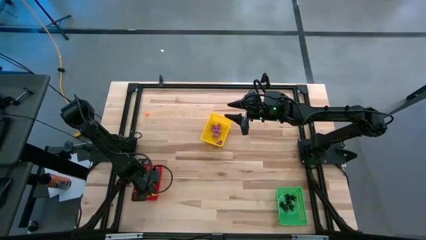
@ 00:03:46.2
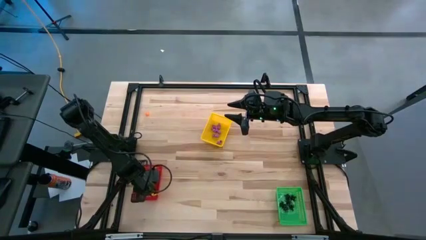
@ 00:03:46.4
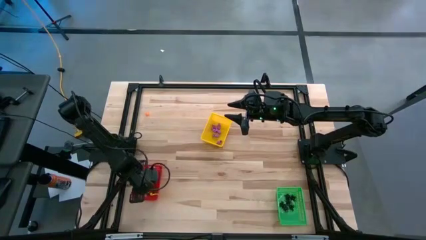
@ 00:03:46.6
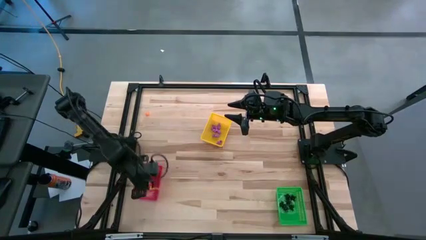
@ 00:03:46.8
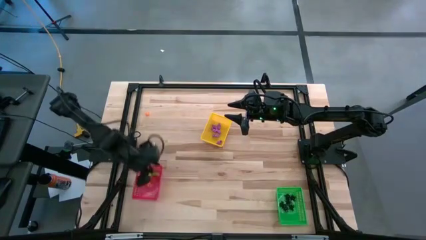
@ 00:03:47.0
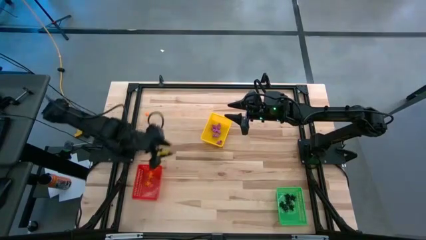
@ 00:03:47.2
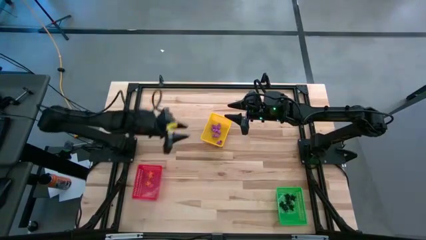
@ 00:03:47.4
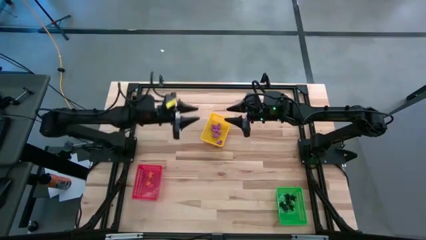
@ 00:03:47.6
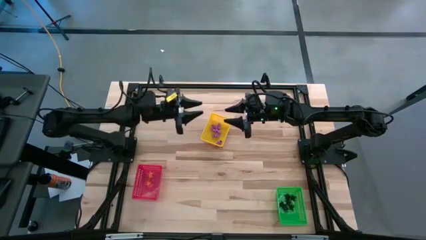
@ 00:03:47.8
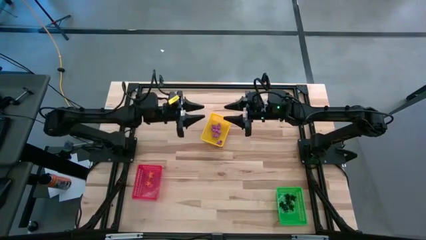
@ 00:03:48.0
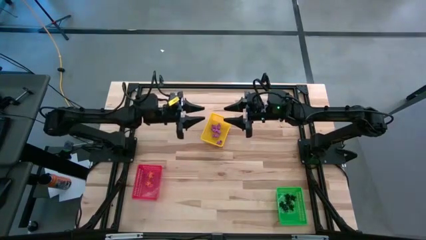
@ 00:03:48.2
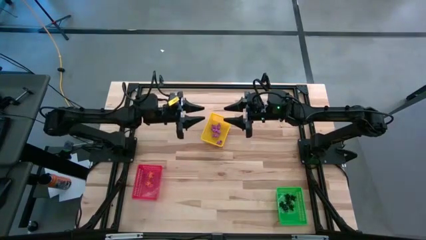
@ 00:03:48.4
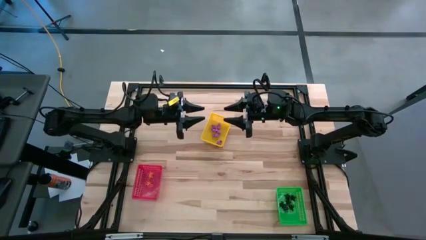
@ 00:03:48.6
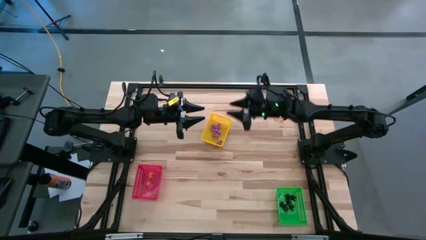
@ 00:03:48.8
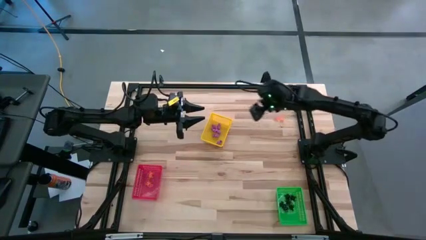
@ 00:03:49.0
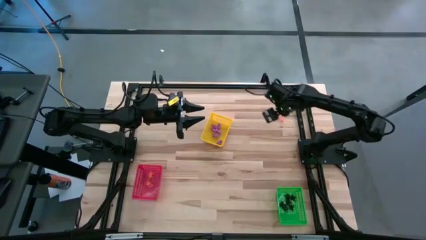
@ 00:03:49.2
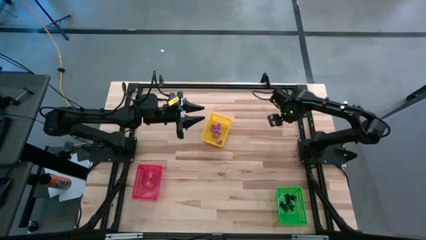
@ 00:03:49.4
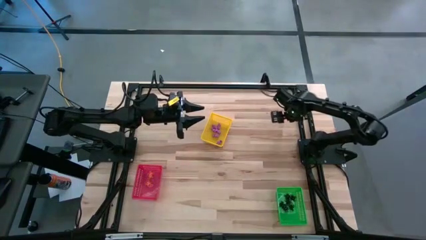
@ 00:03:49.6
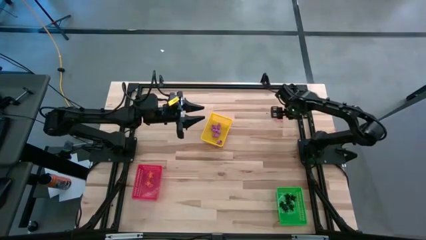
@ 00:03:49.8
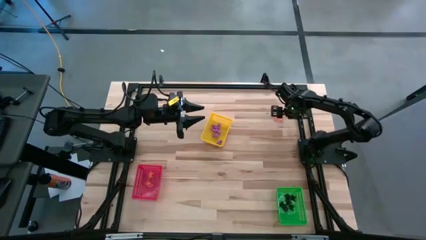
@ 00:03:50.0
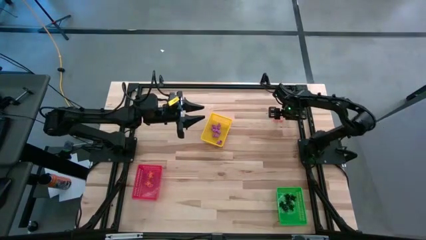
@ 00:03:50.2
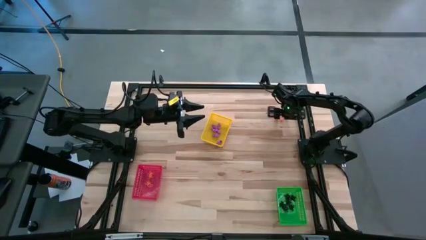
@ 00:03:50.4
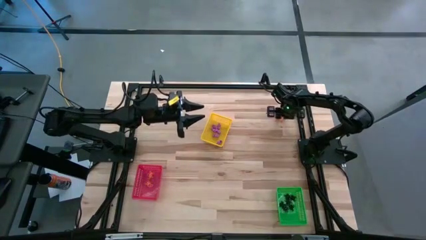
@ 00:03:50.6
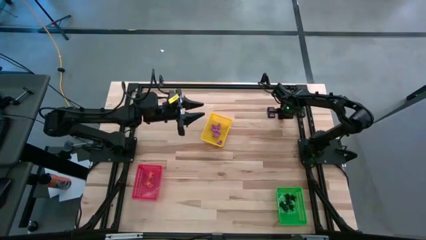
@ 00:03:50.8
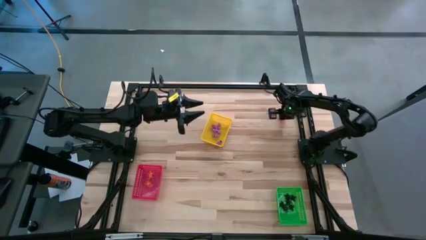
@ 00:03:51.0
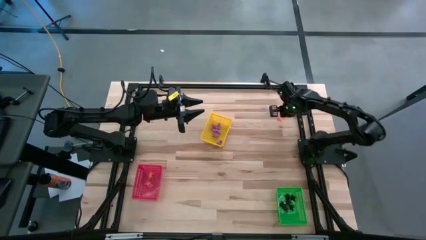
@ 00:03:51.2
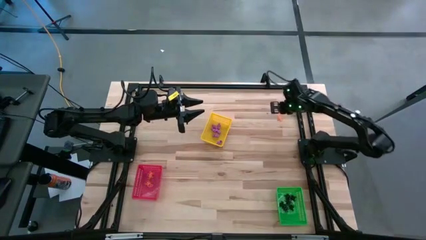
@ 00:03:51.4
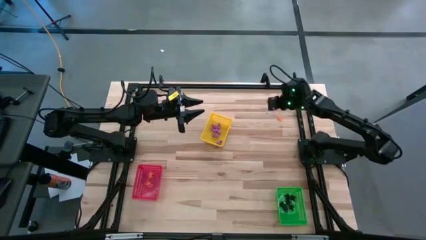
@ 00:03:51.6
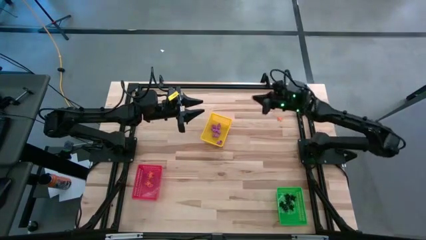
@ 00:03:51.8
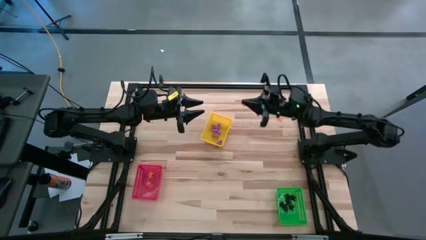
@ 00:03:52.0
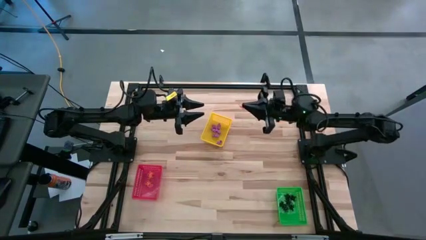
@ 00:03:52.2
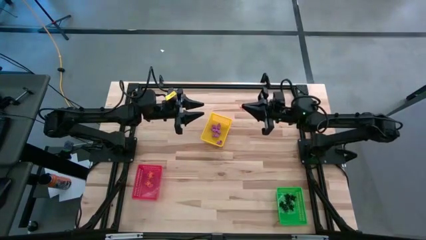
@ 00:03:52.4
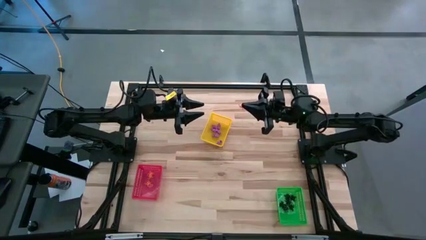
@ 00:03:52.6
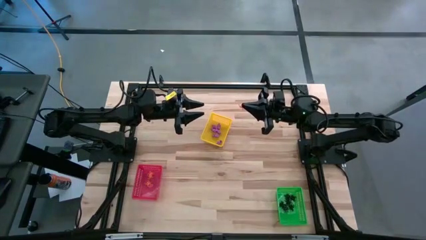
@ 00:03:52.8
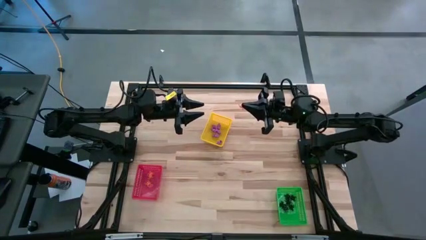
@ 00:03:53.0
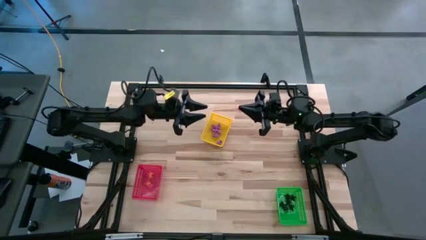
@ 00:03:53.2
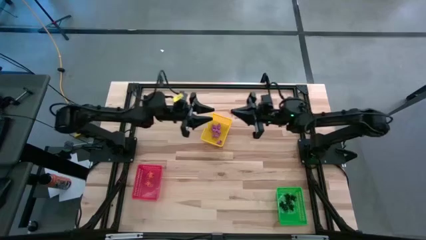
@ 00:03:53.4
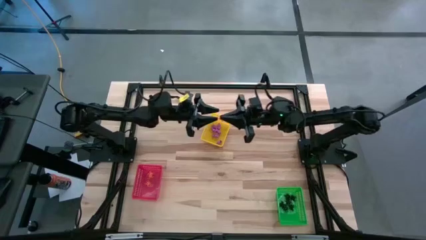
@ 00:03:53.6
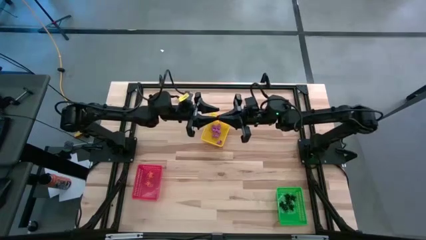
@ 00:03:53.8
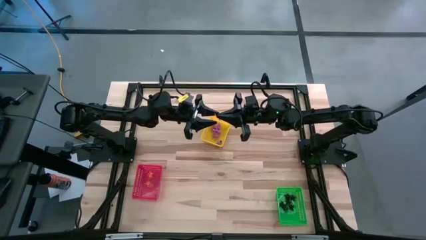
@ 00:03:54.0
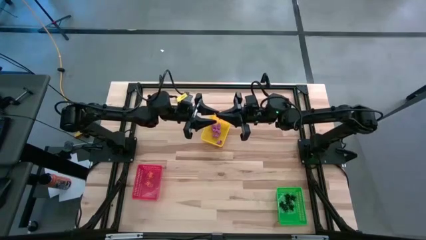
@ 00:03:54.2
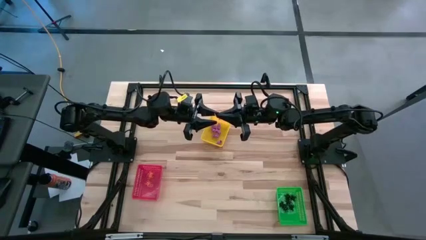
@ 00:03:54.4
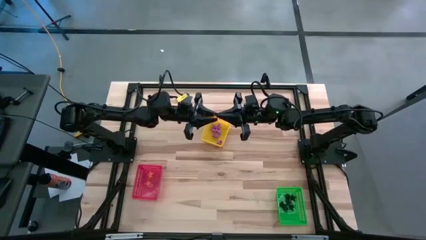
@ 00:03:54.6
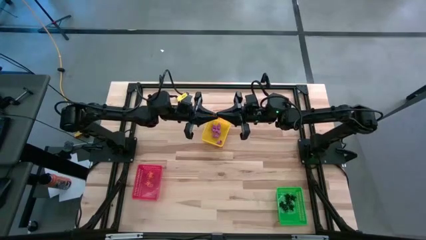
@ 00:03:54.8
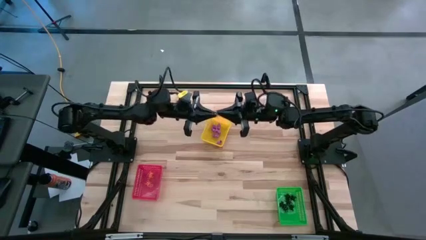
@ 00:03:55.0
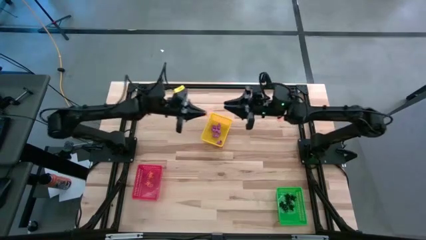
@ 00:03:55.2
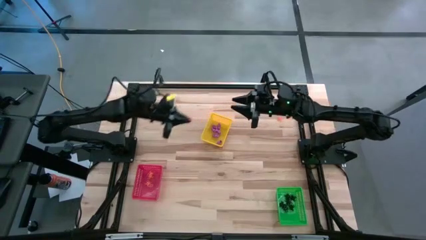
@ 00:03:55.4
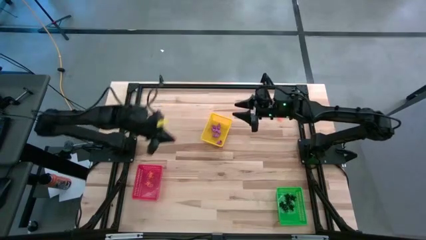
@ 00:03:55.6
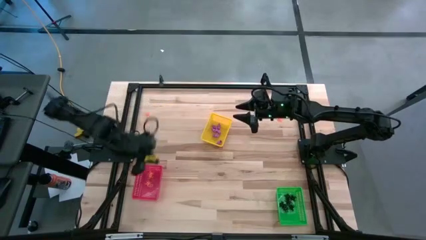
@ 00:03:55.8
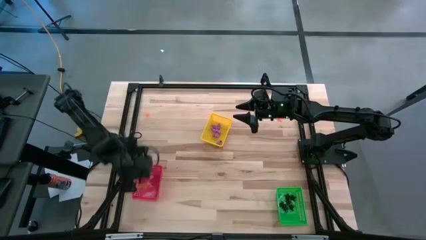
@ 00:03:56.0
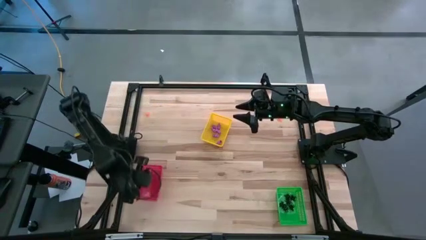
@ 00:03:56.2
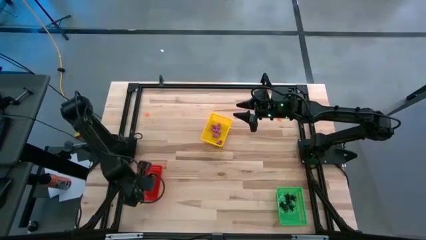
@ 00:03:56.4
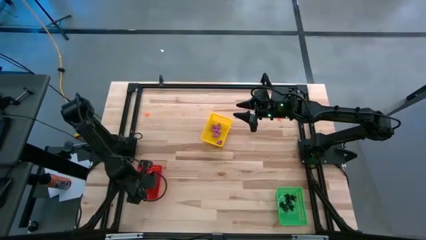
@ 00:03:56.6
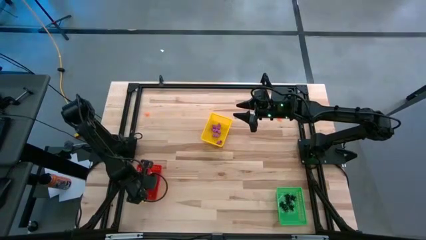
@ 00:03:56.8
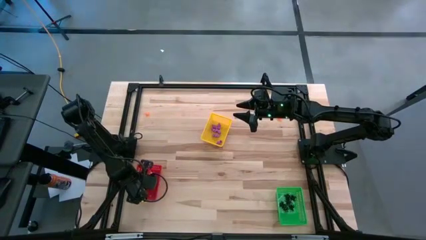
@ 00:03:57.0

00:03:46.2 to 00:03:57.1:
Task: Sort Halloween decoration
Put the right orange spider toy into the red bin

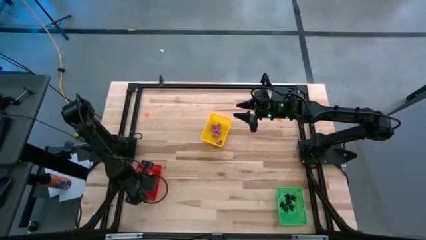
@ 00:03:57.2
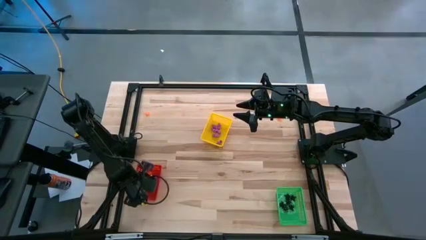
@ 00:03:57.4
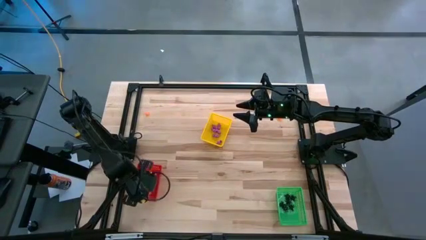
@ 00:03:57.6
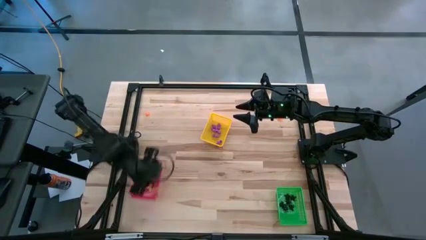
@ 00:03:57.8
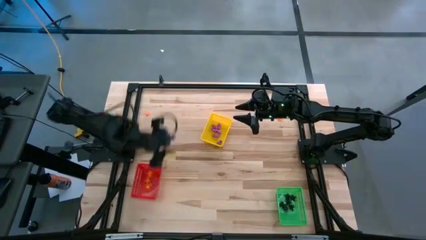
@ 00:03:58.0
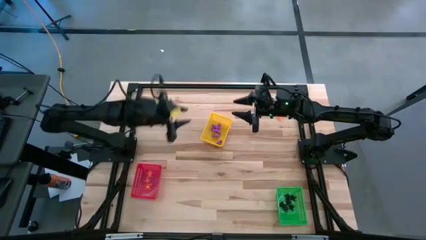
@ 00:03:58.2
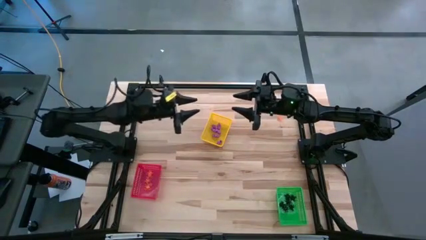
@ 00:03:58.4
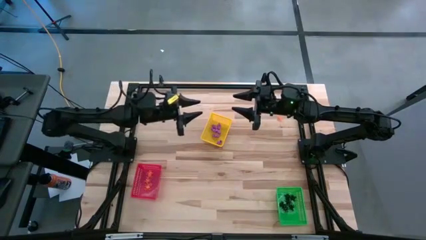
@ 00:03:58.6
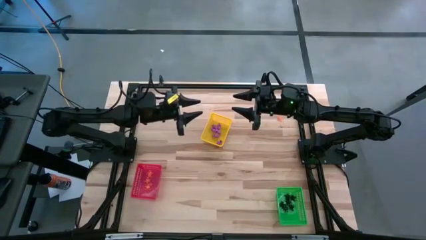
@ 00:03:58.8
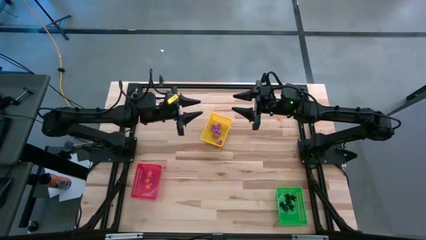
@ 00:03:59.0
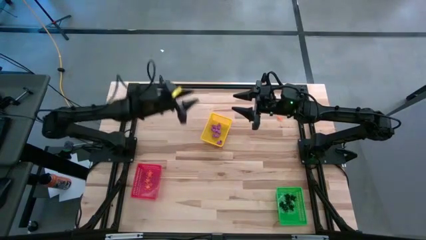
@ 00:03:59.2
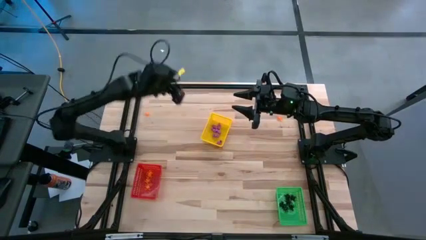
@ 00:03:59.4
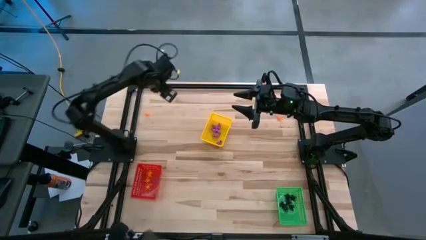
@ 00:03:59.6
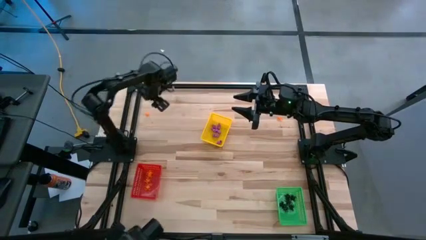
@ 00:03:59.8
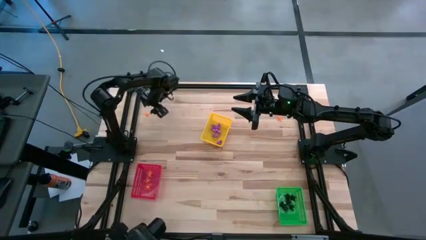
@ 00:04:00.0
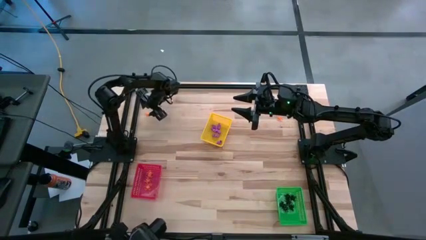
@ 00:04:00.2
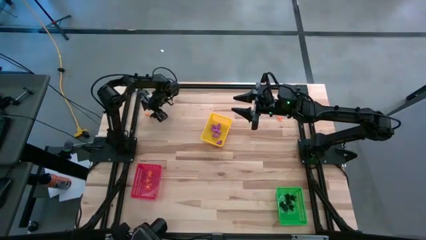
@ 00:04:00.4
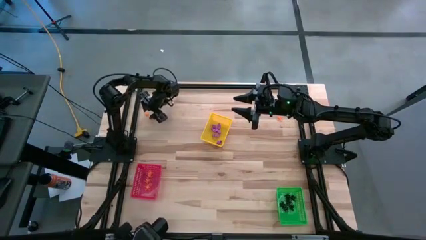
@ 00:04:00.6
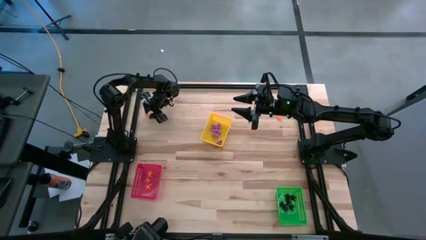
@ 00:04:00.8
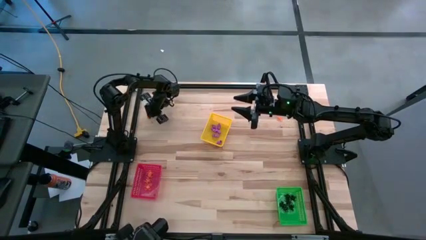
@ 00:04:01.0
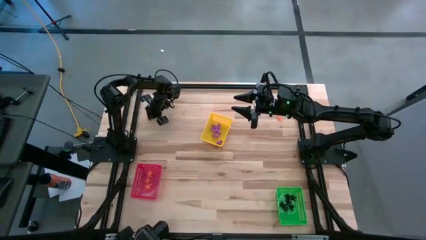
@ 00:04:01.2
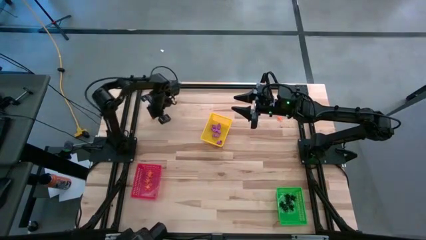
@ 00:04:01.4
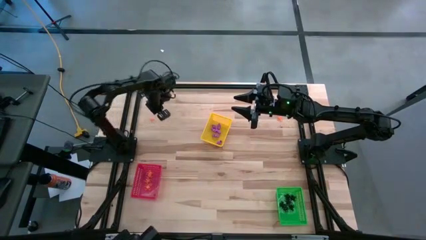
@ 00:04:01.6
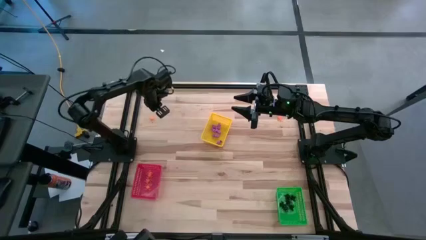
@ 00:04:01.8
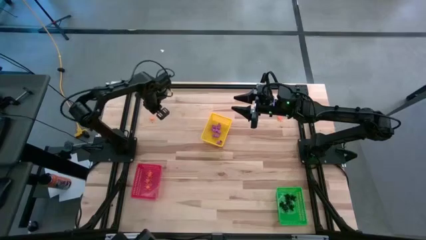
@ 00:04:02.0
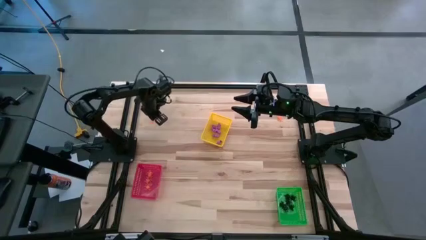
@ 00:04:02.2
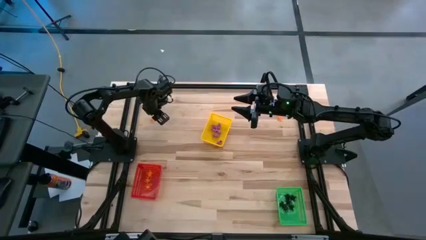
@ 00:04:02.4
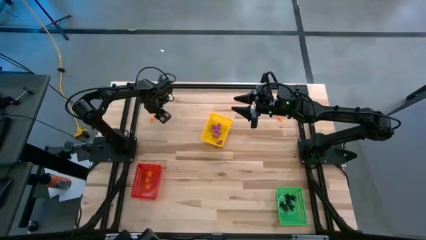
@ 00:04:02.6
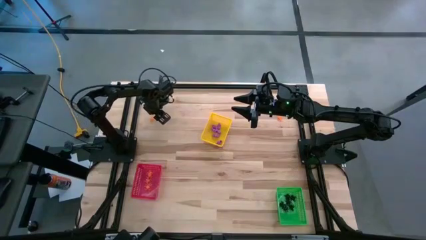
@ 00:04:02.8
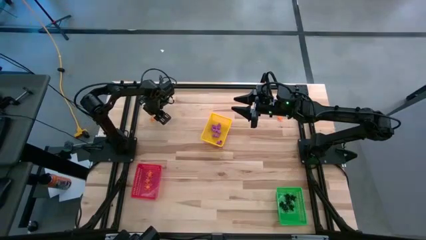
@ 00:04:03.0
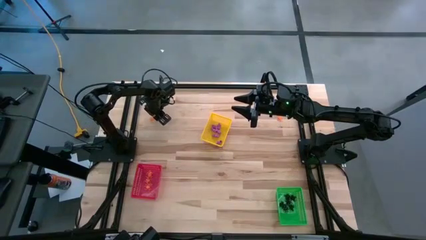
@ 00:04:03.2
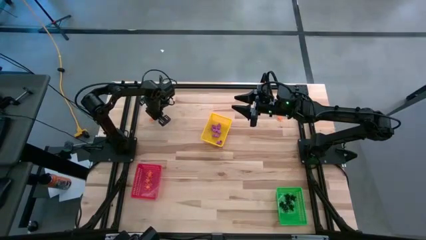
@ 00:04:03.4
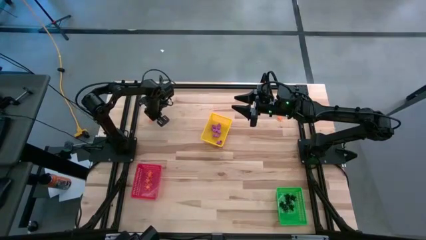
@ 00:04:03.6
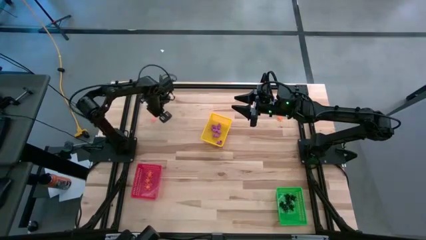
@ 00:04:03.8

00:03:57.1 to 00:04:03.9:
Put the left orange spider toy into the red bin
